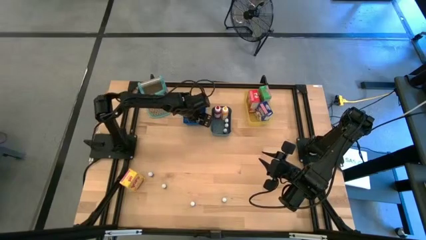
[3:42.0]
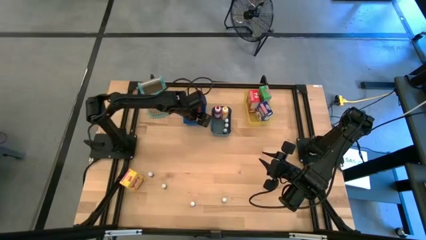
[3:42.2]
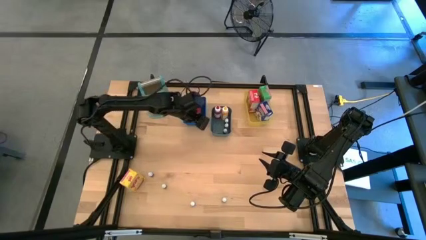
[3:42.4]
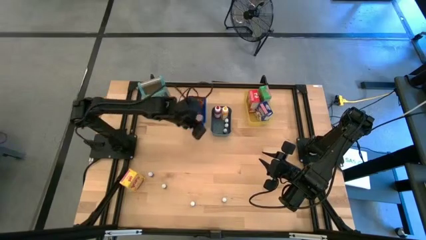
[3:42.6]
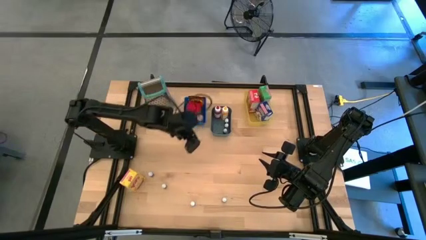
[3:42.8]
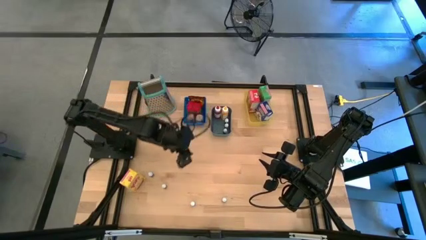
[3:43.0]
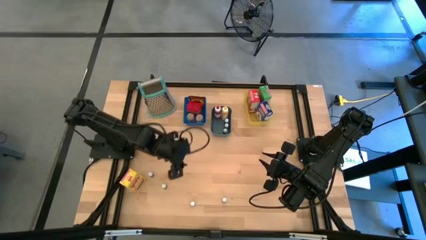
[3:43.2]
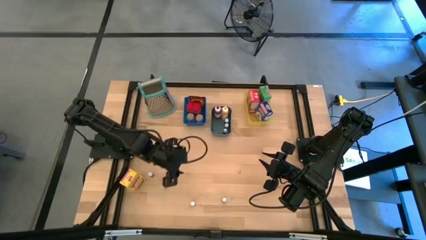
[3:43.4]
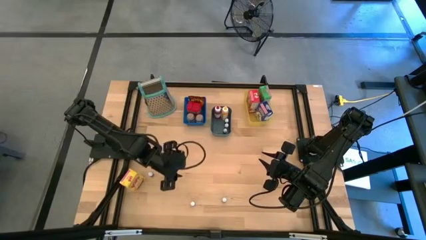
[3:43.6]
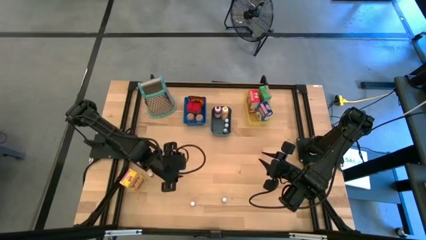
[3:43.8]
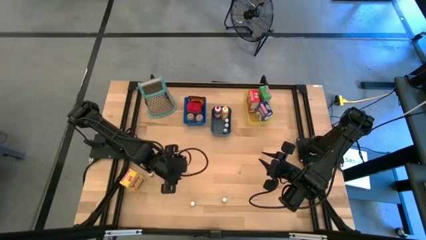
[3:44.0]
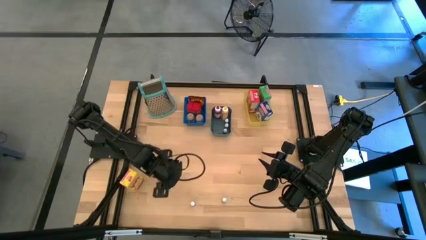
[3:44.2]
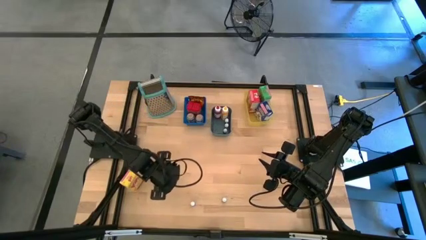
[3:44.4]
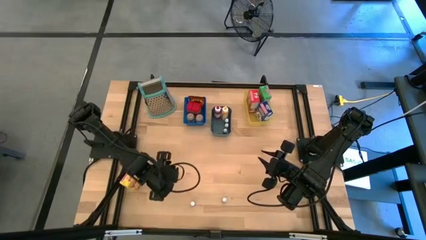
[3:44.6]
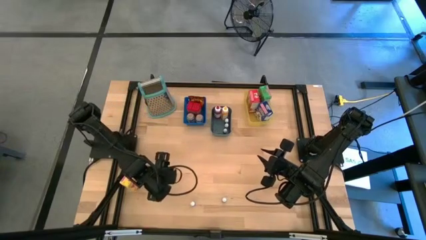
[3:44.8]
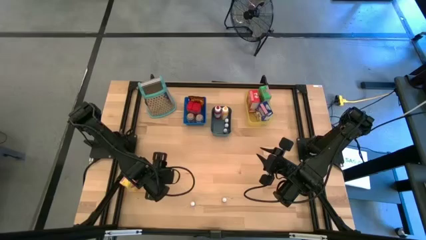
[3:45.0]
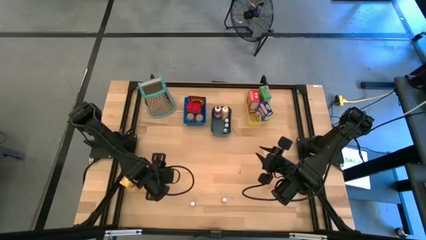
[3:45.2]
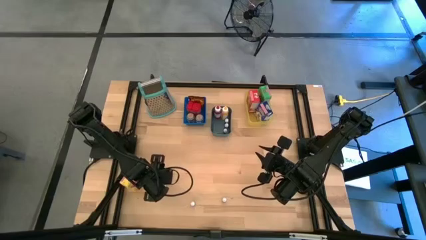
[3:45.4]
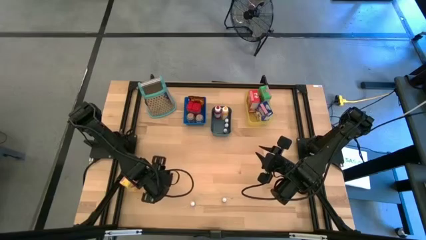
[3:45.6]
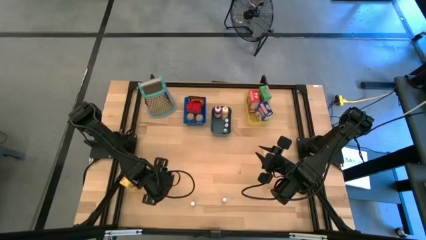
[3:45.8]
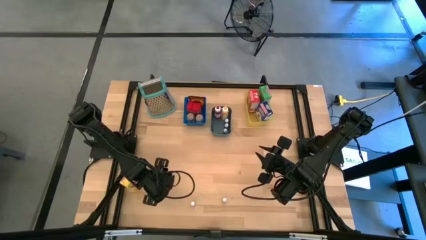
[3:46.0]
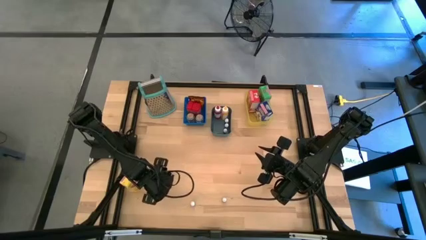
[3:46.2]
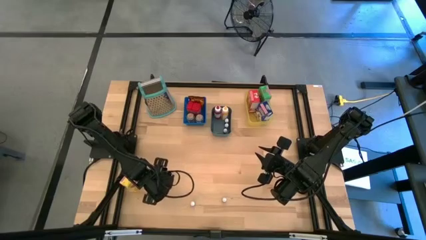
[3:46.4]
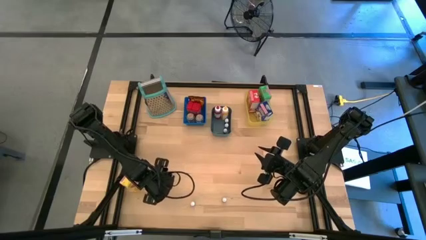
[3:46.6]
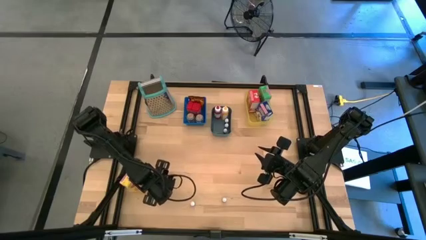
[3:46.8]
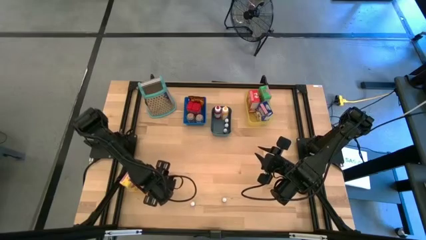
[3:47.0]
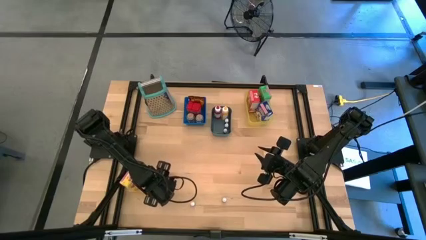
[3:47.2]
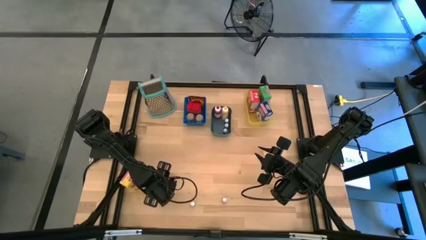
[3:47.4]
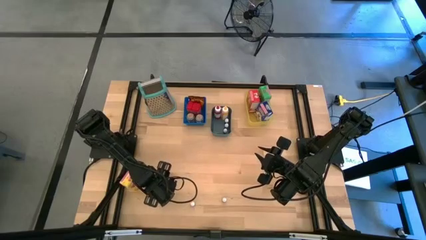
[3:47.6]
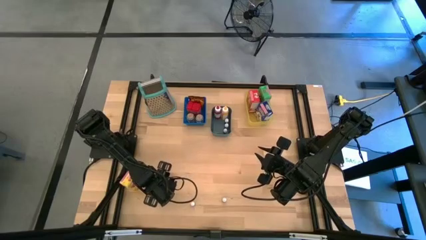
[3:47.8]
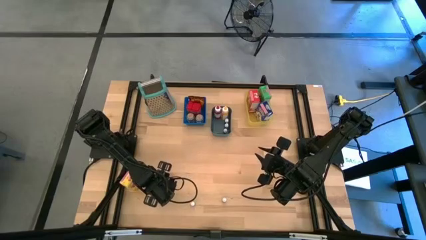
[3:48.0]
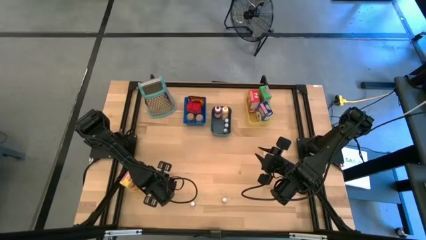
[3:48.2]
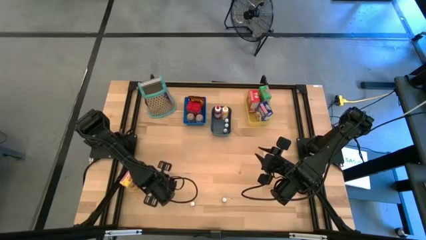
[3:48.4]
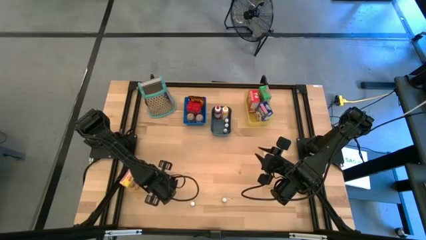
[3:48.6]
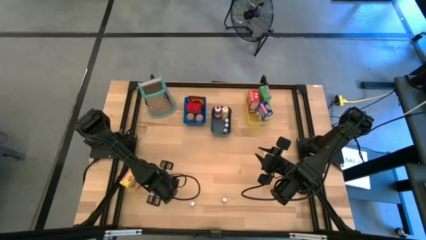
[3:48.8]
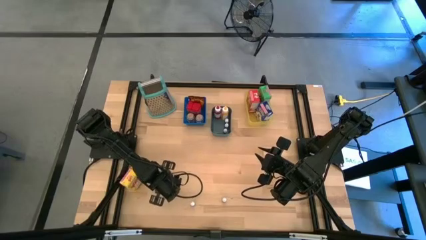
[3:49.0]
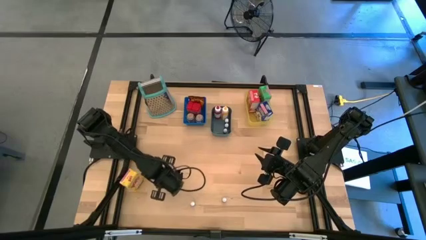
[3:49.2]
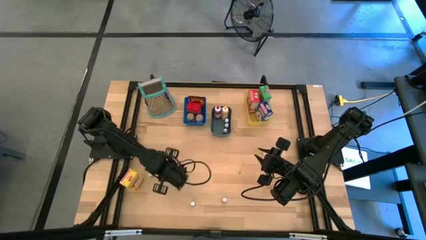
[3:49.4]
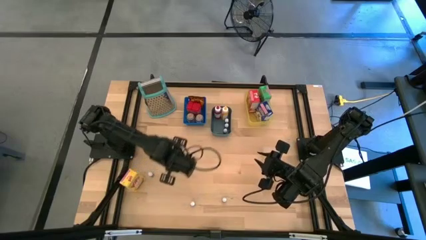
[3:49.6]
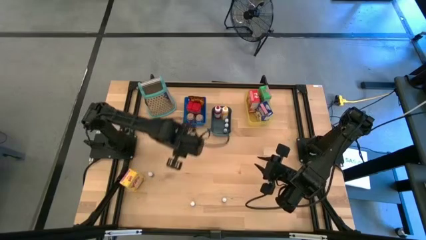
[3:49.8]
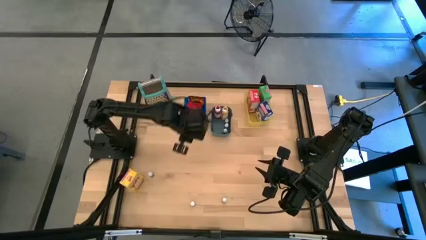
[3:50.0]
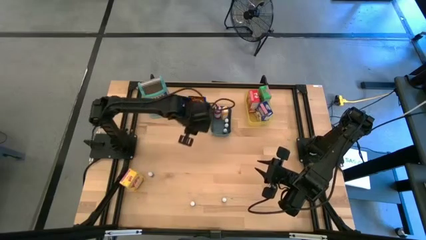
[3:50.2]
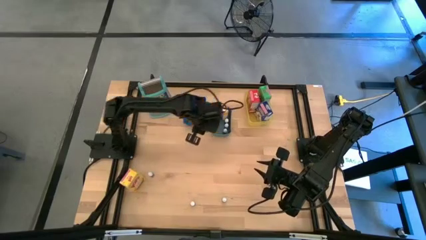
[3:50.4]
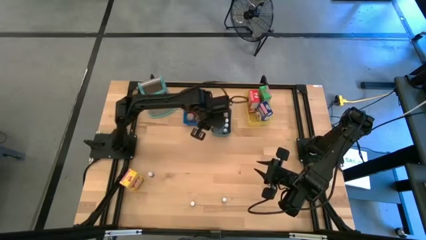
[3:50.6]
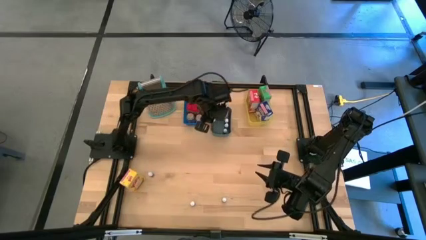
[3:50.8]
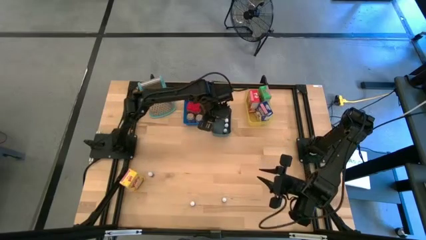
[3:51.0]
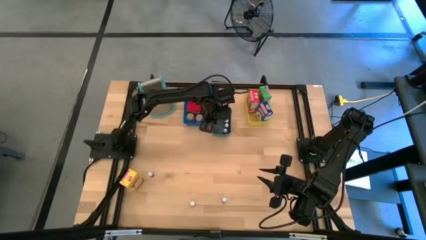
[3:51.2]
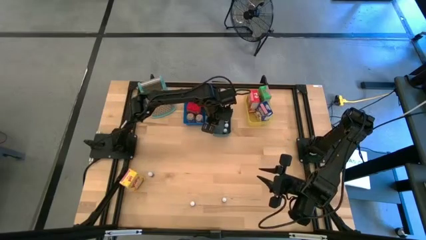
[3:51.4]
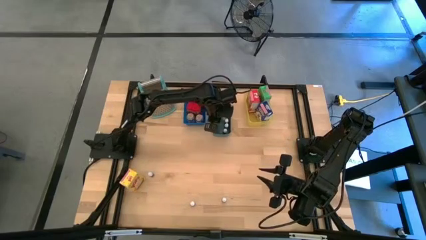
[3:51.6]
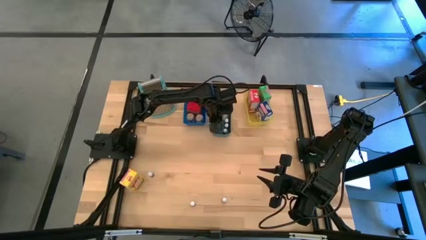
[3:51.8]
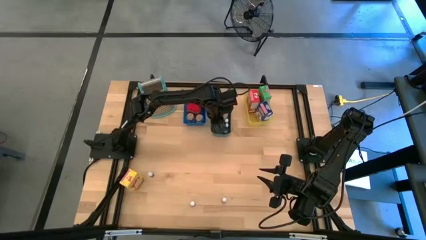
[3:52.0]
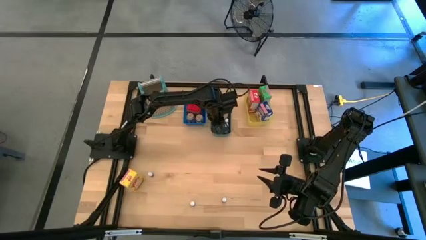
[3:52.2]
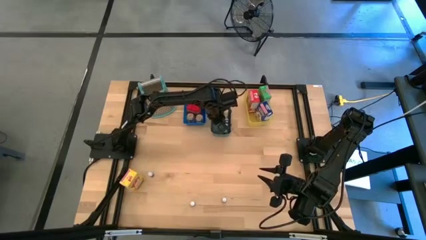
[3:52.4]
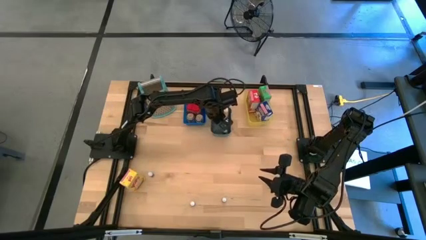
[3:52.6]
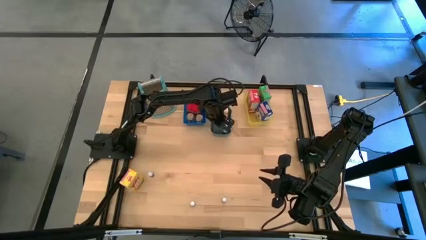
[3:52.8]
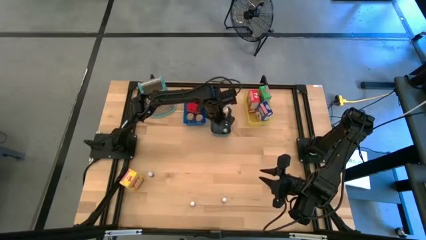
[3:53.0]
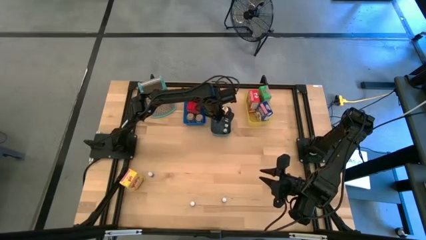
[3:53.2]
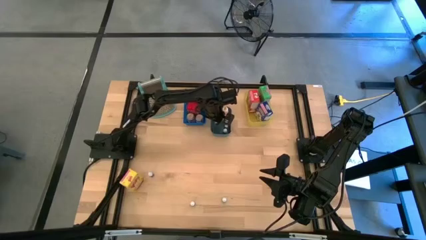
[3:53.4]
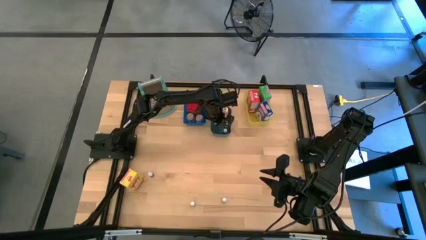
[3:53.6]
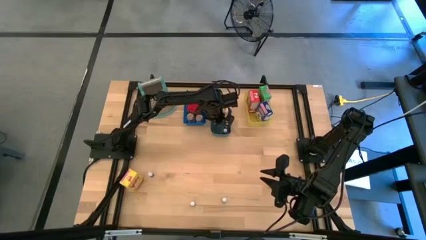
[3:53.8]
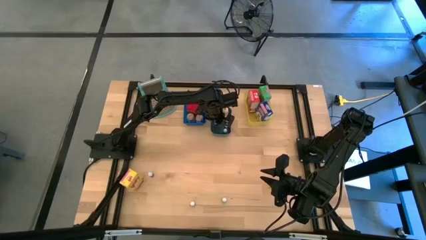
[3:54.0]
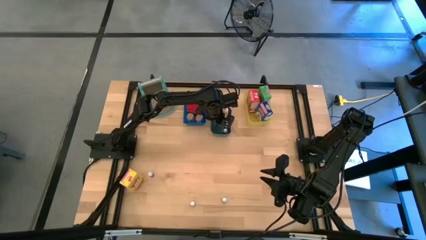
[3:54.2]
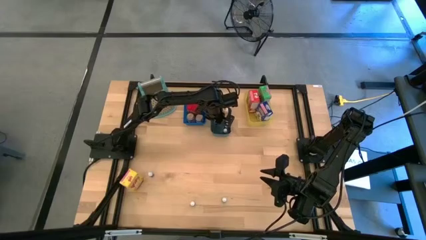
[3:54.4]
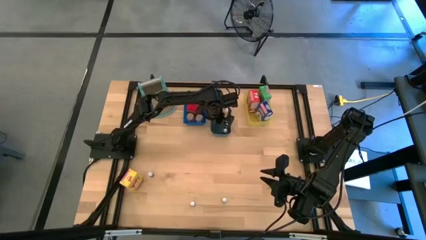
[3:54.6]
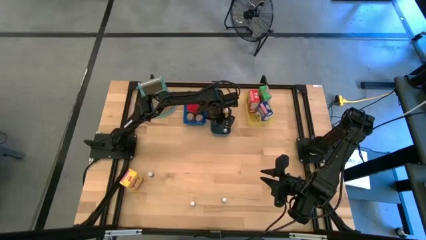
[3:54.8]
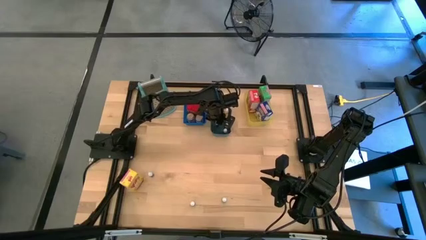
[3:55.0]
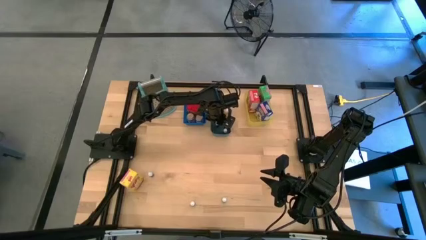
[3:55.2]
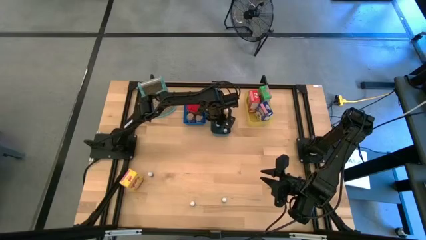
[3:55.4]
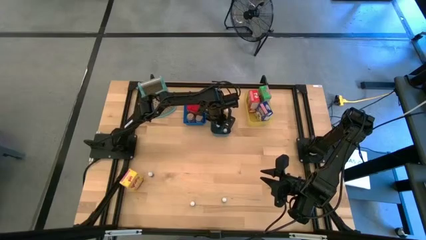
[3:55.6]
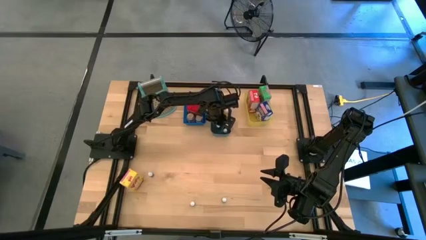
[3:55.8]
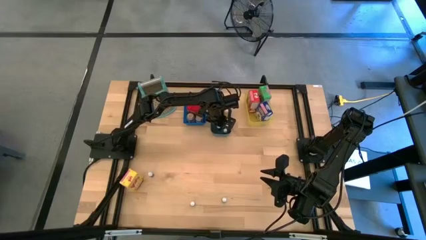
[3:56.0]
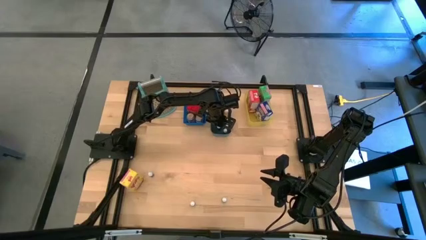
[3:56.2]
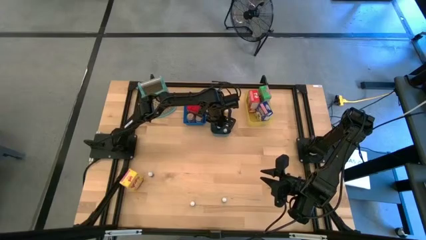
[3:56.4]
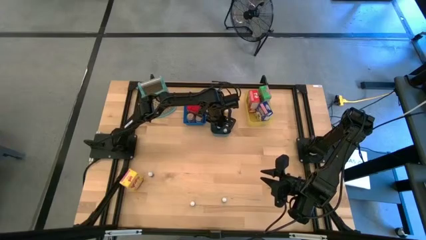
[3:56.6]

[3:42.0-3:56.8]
Task: Pick & Place Kitchen Items
Put the small black food coloring bottle into the dark green bin

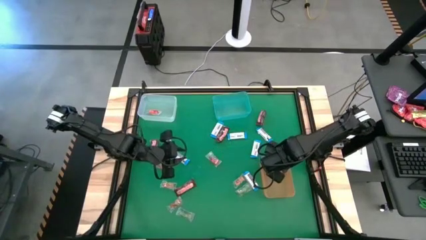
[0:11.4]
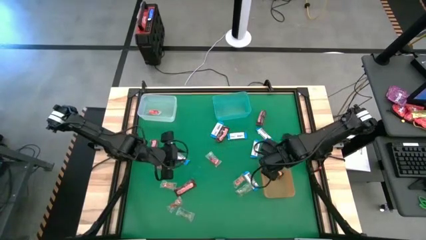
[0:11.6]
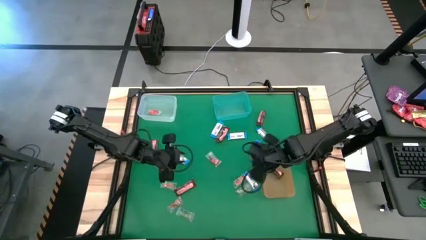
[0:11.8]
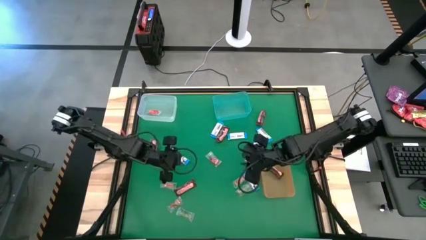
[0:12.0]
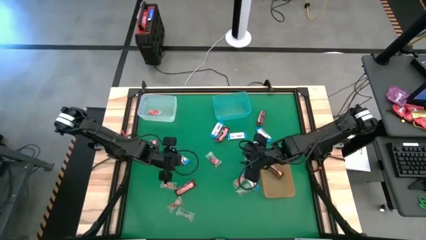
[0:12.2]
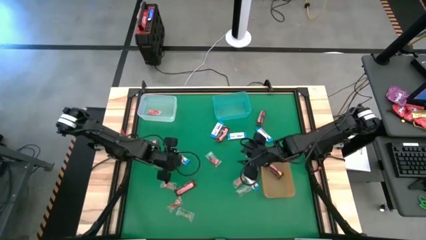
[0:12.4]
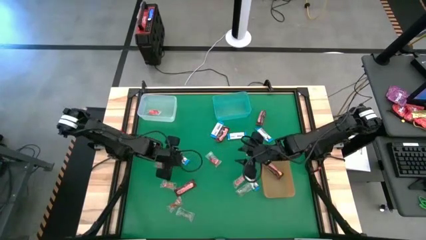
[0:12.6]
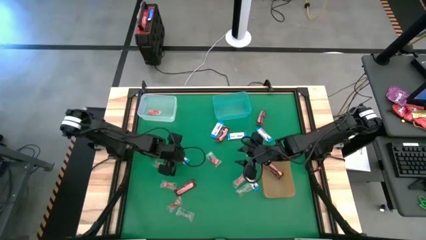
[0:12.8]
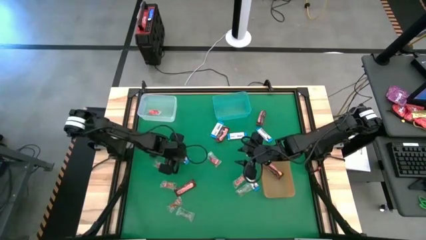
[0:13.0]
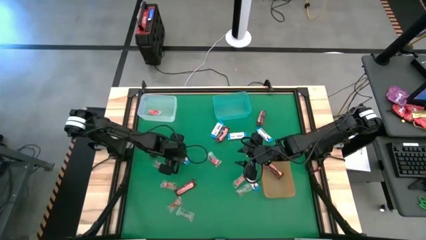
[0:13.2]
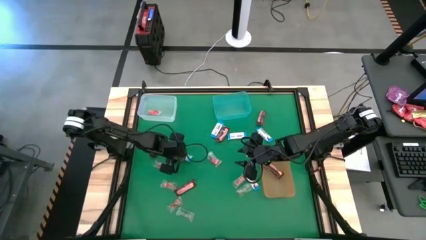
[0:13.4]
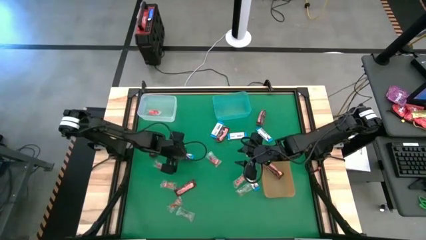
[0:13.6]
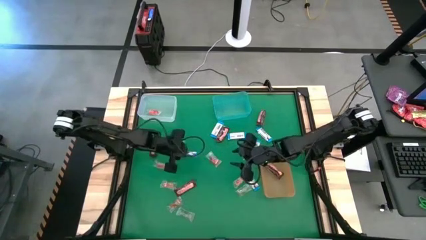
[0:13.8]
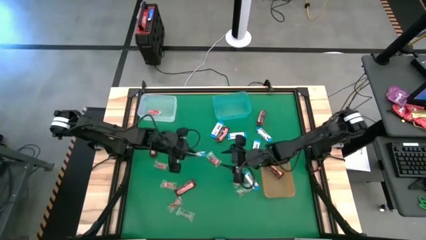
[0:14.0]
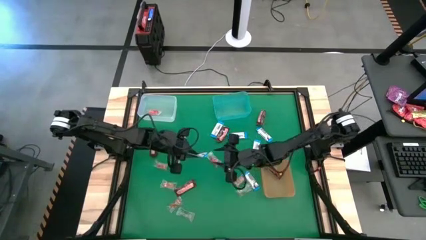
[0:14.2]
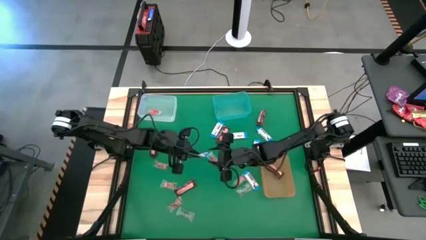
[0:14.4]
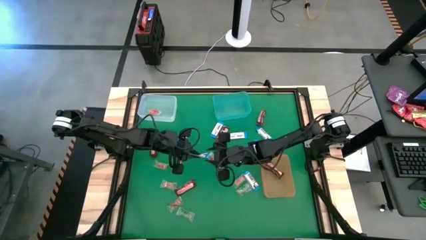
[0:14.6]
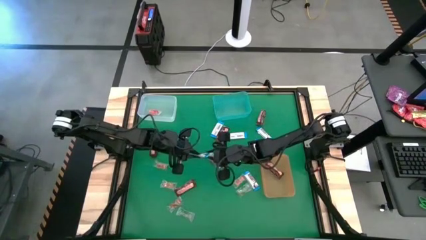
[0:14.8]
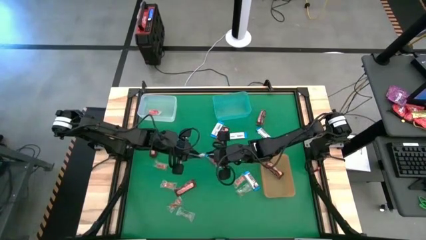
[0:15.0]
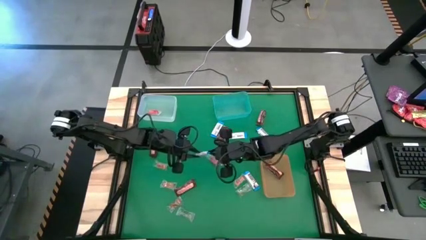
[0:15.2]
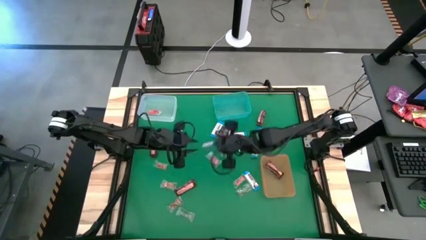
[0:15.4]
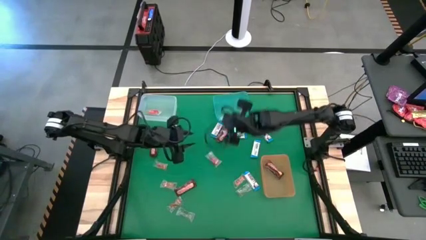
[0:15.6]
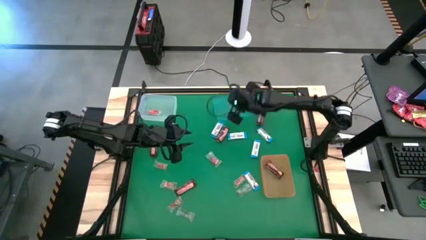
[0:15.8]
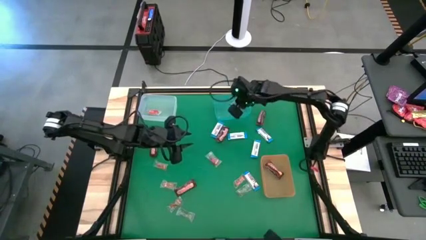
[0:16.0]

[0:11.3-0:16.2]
Task: Sort candy by brand, put in halloween buckets
Put the white chocolate into the light blue bin
